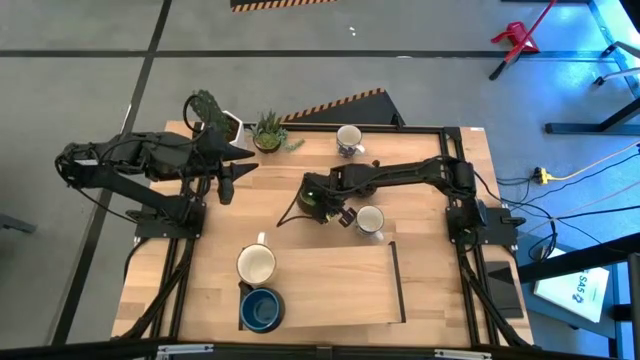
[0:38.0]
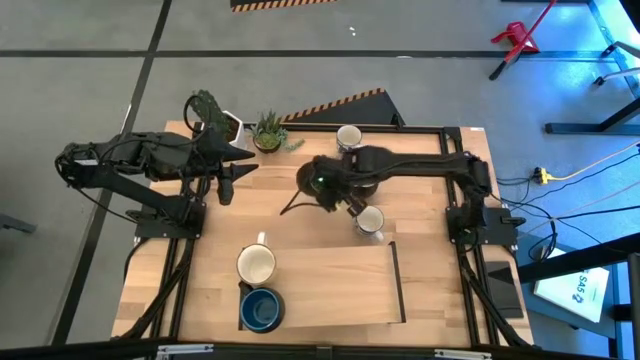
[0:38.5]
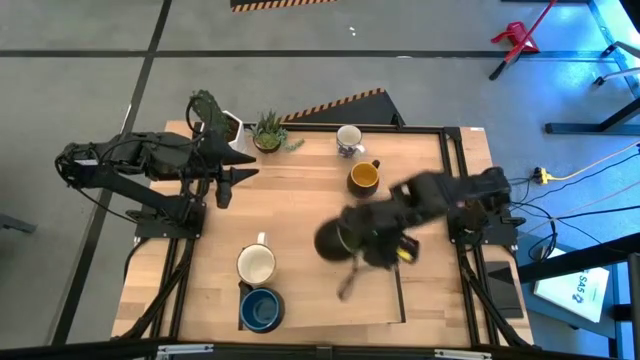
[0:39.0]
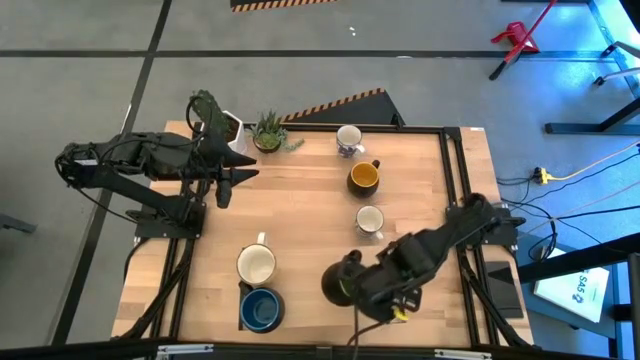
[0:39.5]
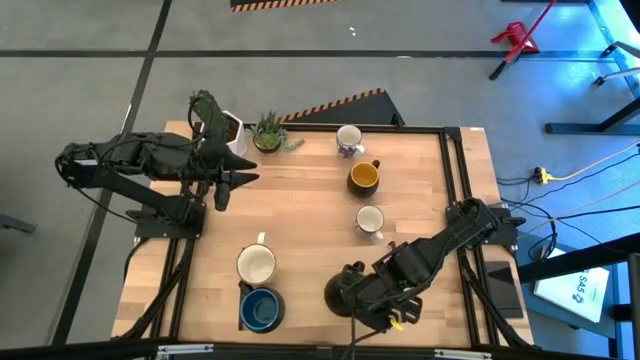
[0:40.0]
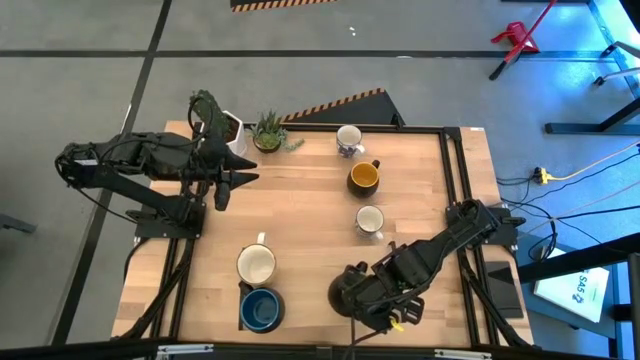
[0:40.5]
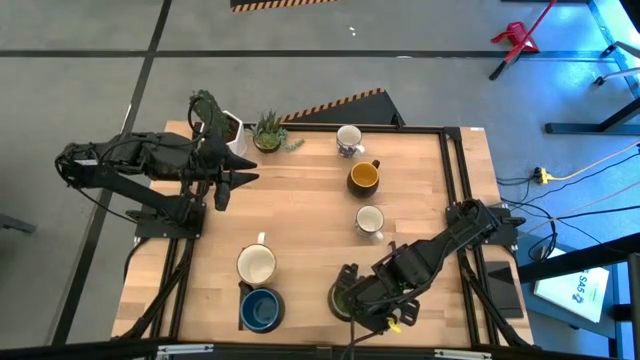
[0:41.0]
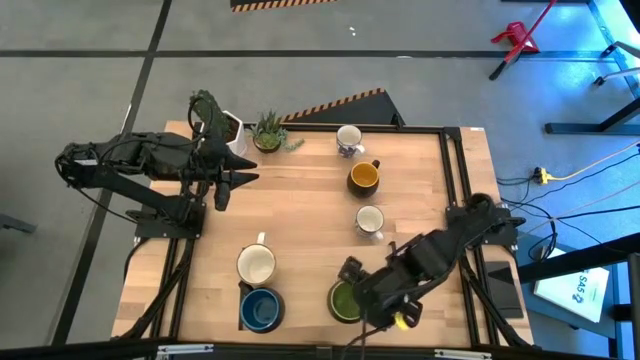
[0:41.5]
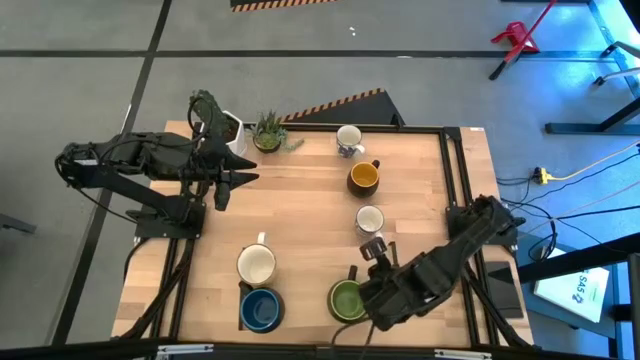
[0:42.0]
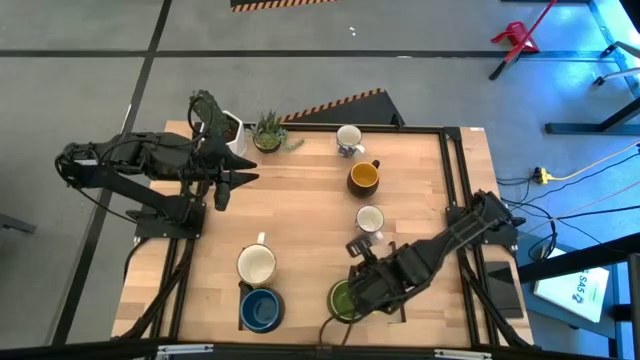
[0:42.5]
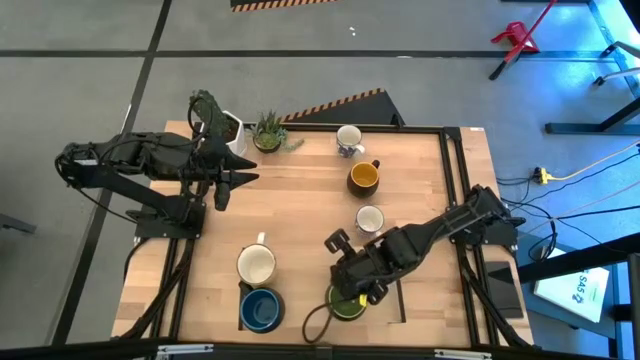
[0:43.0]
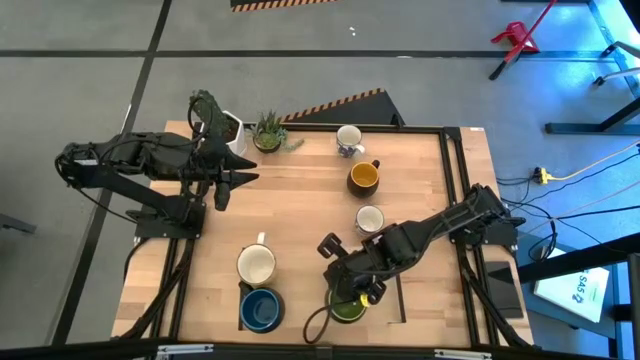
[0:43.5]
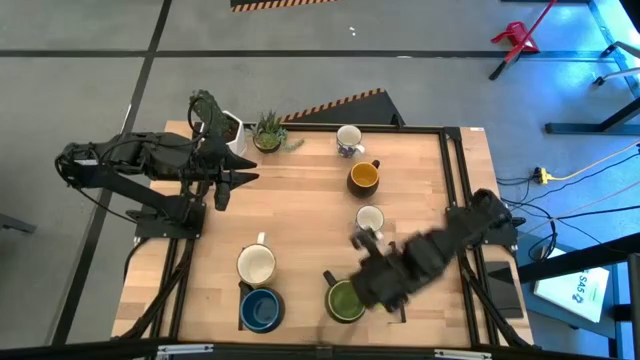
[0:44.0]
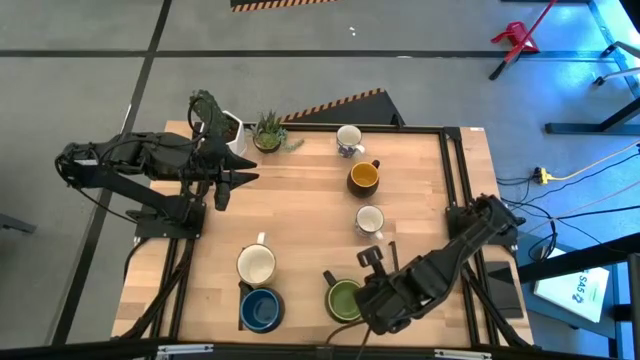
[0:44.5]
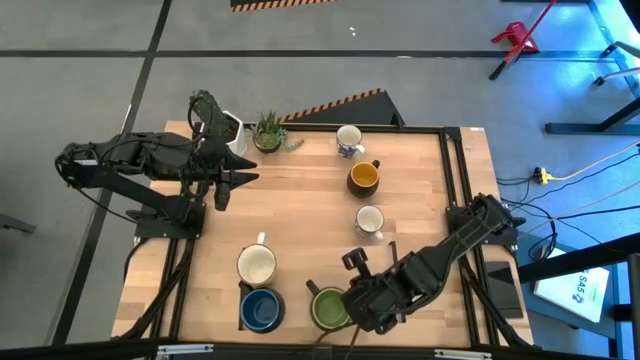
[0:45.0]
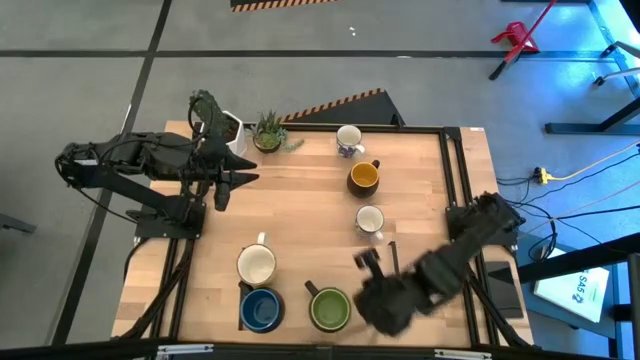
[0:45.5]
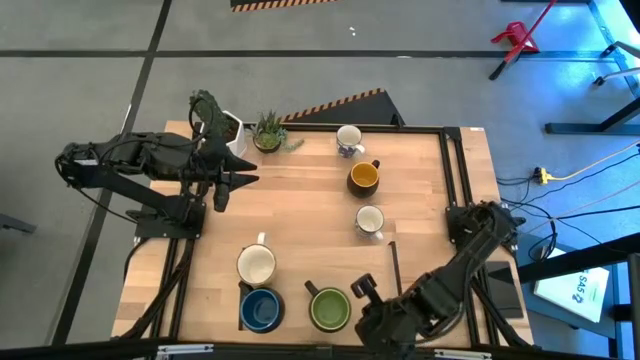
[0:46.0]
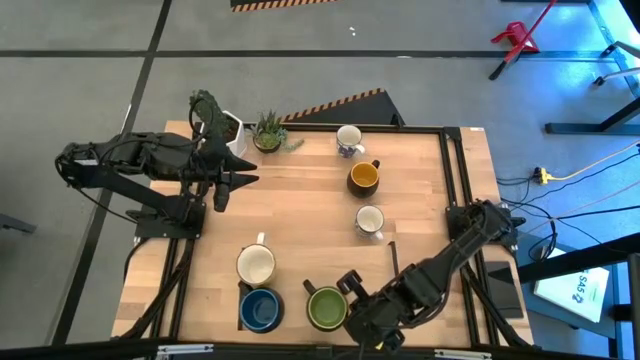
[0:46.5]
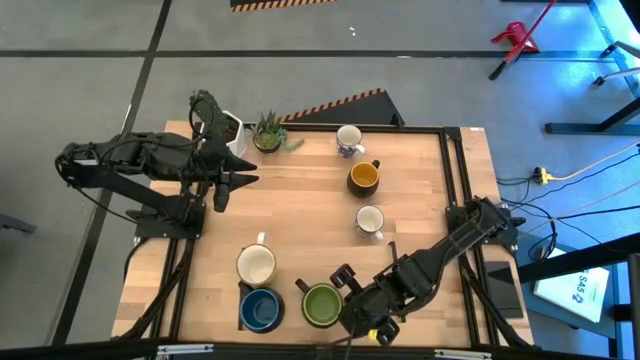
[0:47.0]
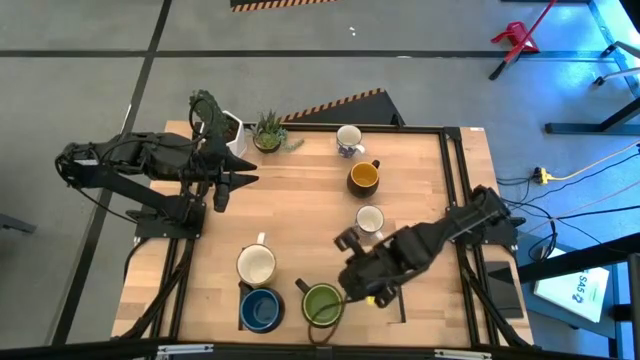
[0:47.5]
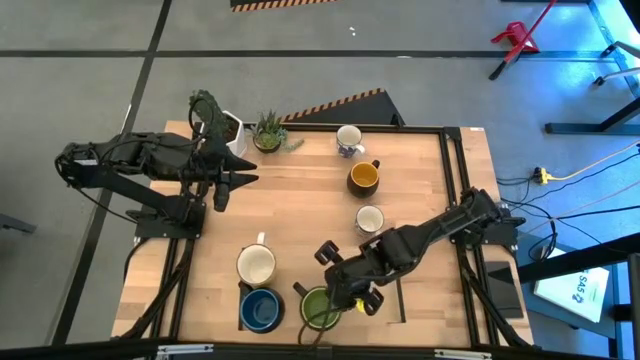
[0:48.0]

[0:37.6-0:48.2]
Task: Place coffee mugs
Put the green mug on the shelf

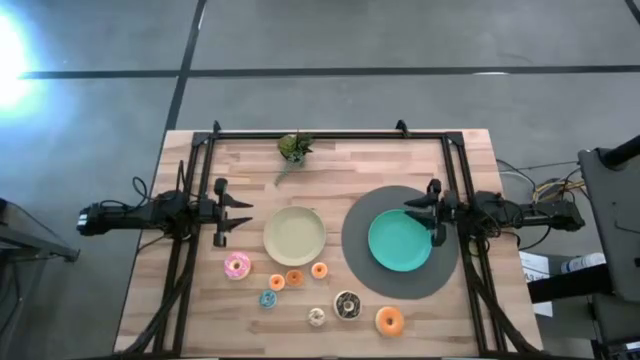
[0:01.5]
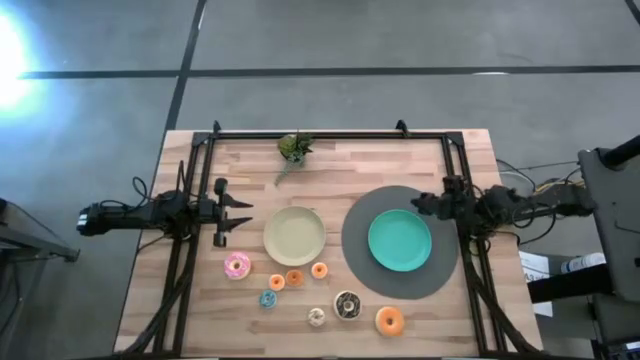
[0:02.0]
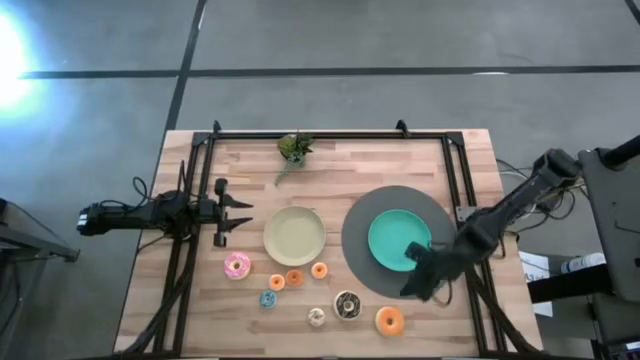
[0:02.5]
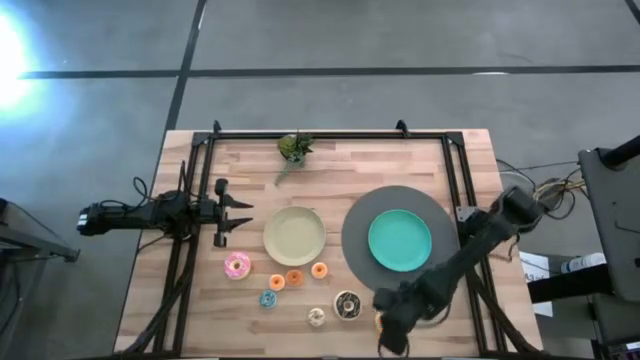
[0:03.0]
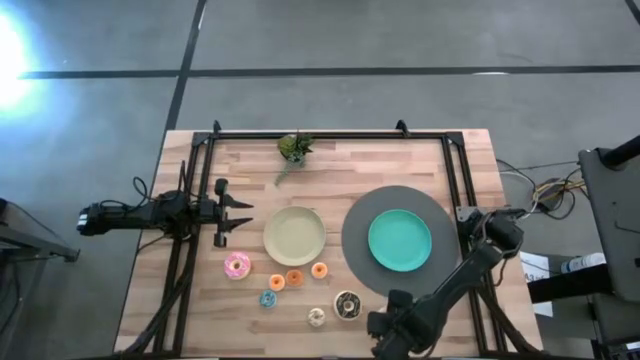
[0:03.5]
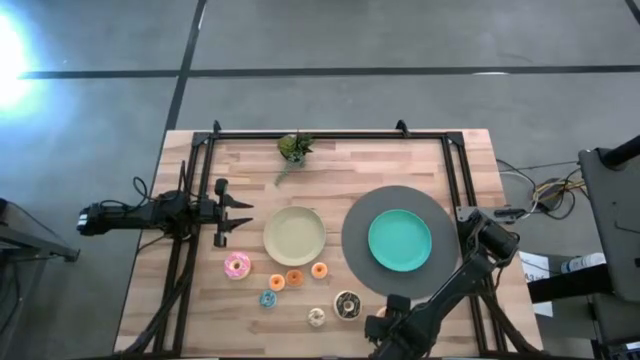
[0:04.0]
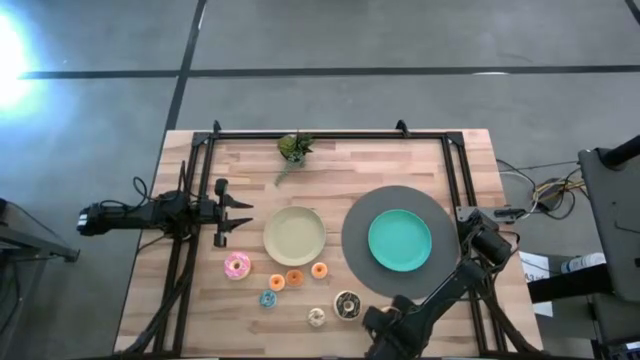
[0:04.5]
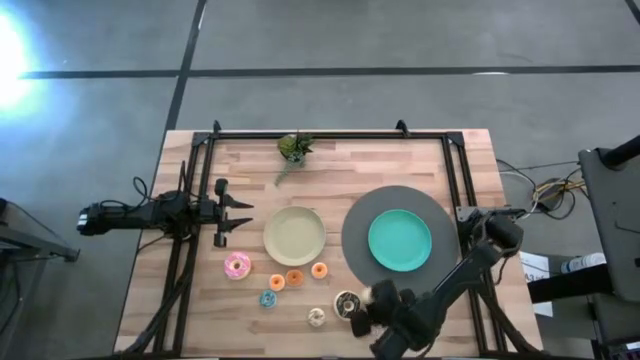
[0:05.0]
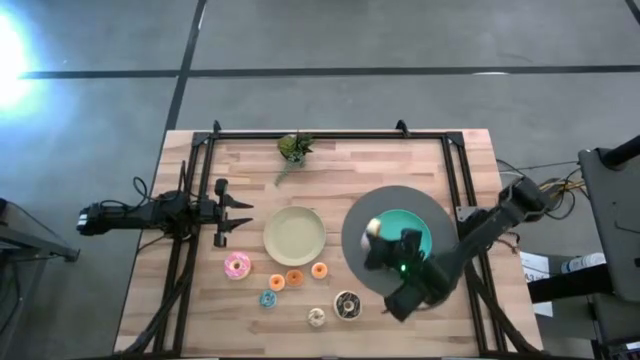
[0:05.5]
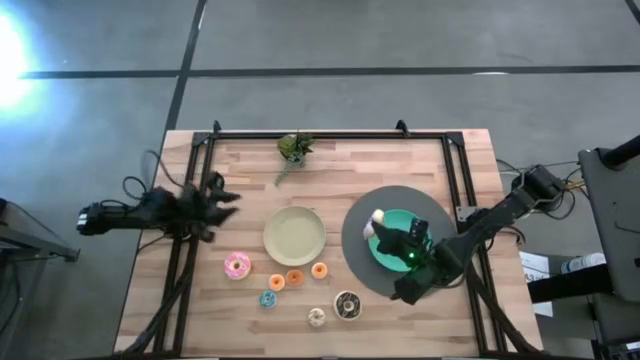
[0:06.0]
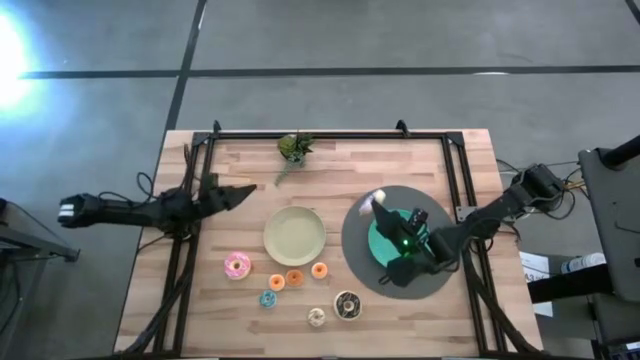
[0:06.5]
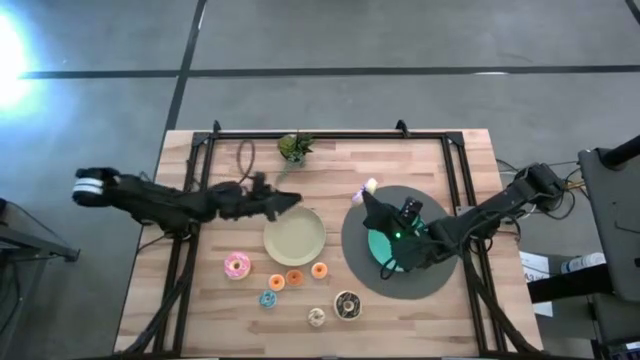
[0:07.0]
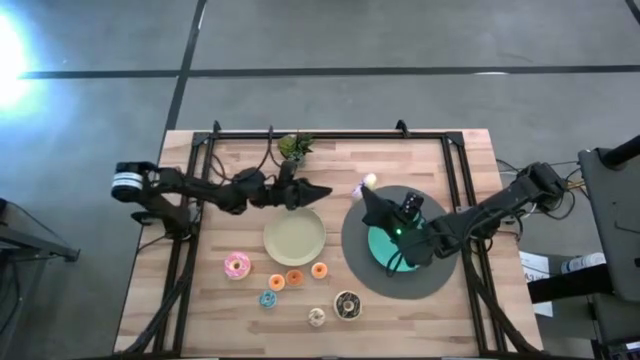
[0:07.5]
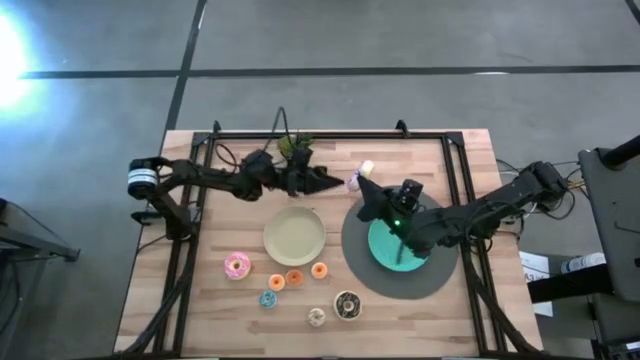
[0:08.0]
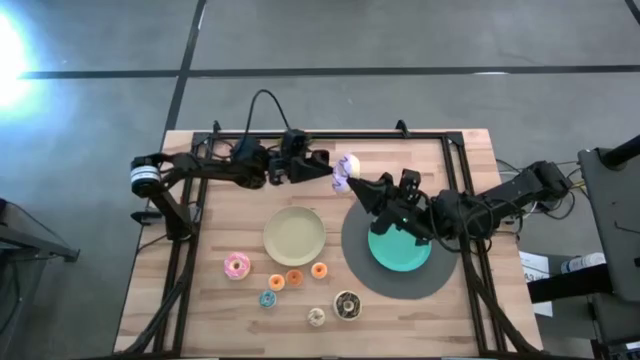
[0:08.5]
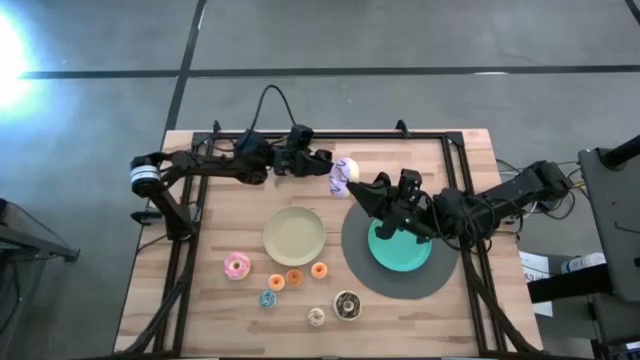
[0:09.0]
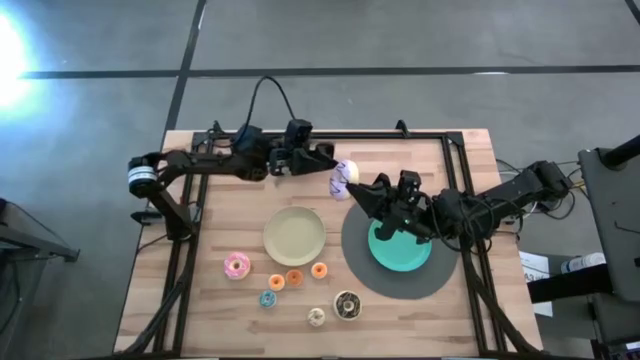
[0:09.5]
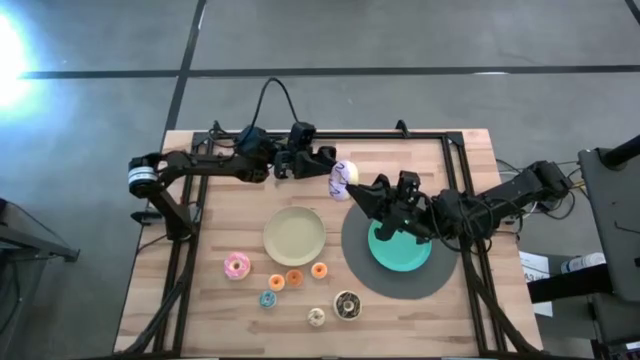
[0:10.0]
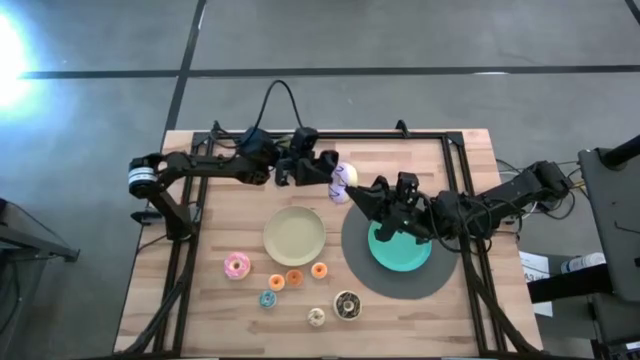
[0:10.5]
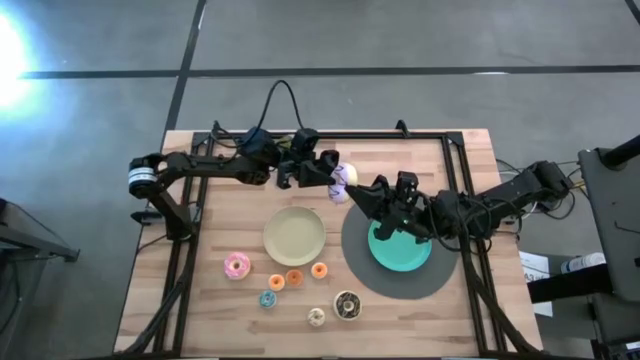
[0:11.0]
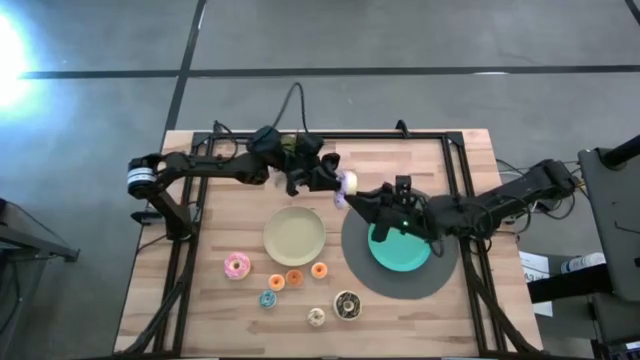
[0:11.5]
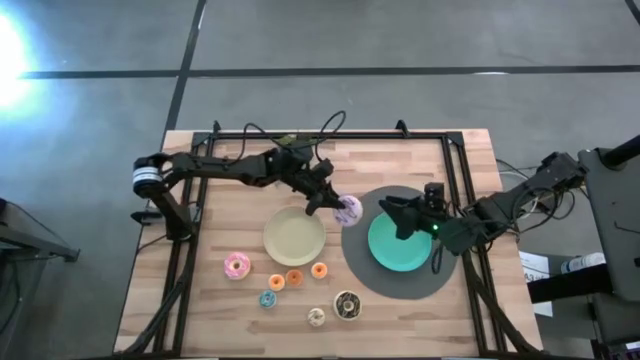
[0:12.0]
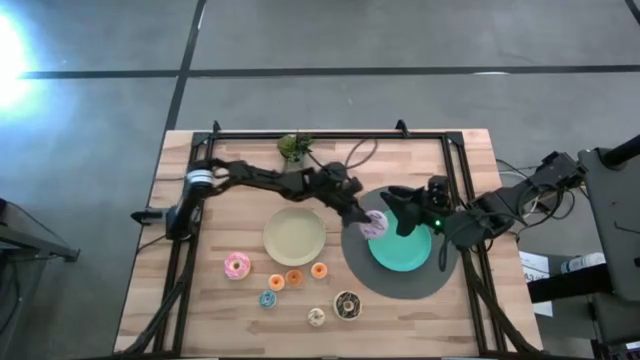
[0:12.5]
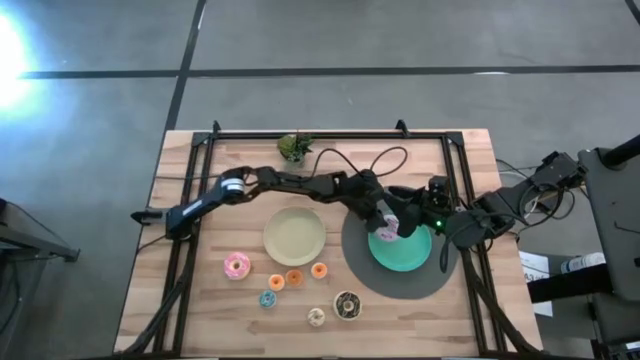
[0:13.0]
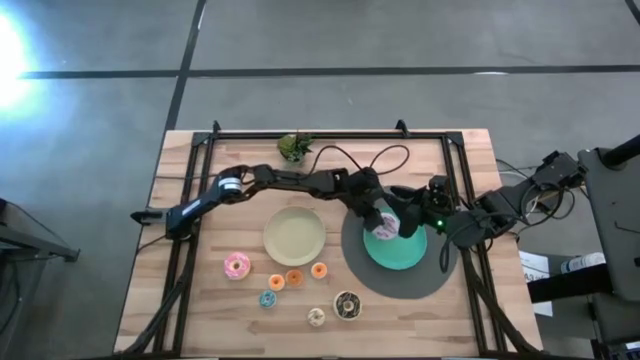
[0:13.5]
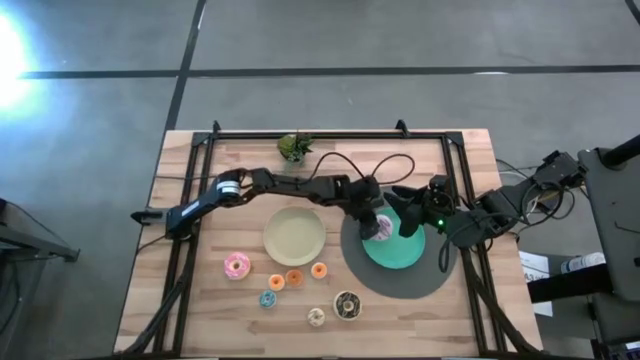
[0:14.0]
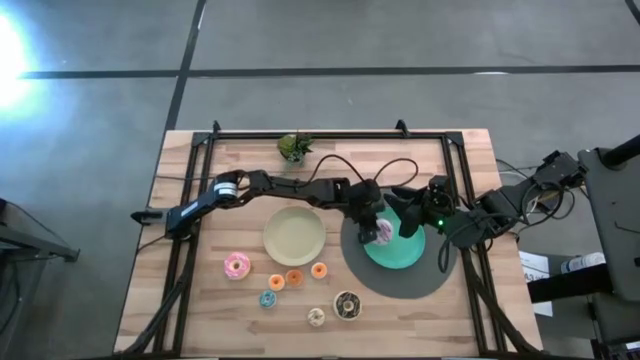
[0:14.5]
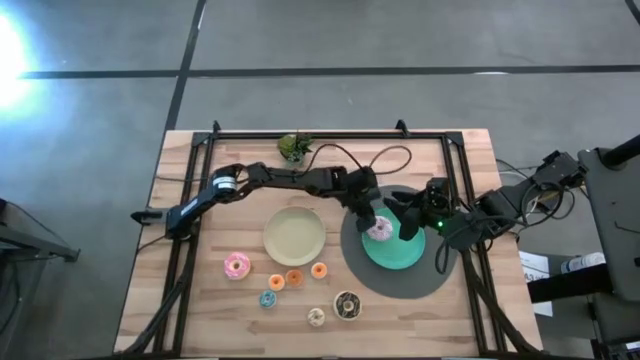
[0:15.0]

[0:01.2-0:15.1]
Task: Pick & Place donuts
Put the big violet donut on the green plate
